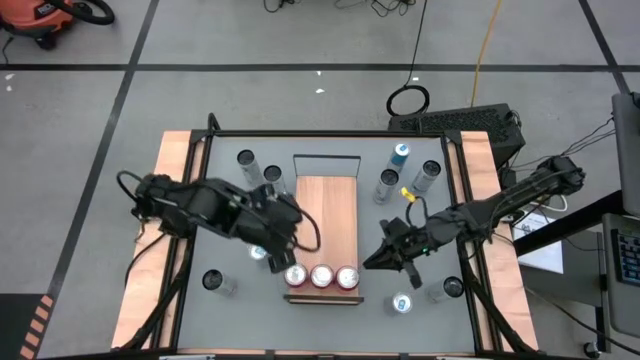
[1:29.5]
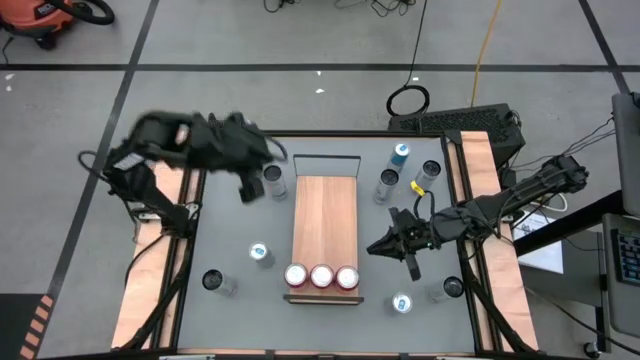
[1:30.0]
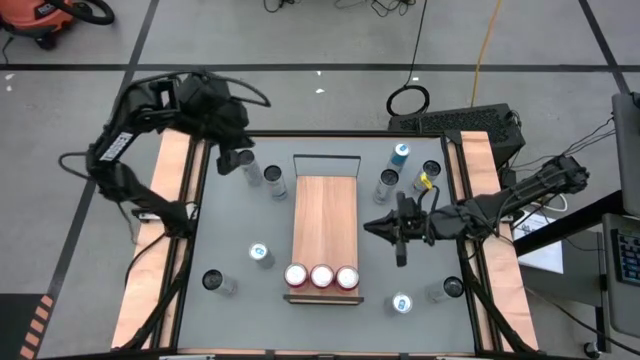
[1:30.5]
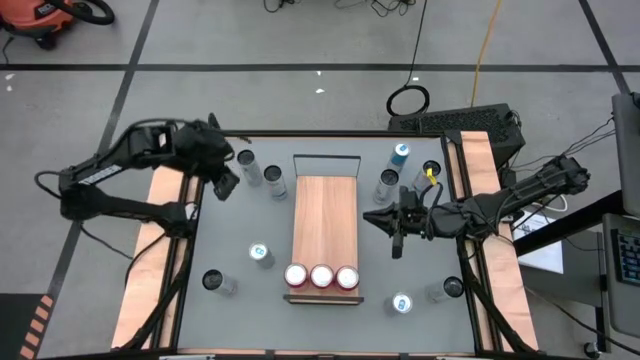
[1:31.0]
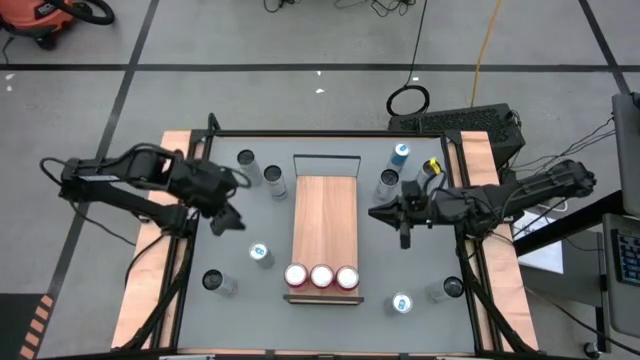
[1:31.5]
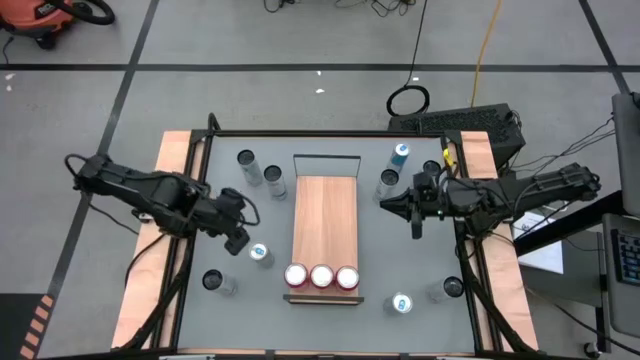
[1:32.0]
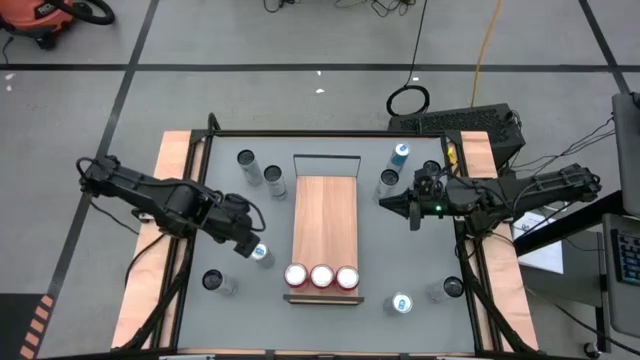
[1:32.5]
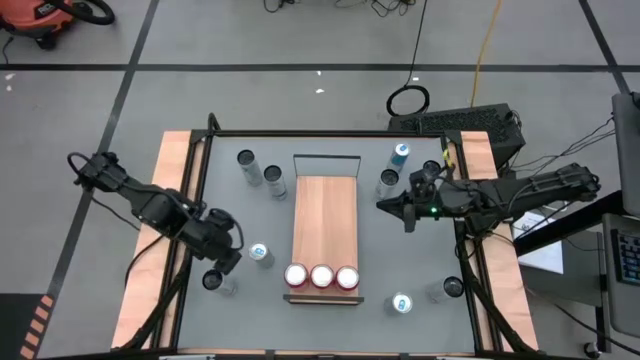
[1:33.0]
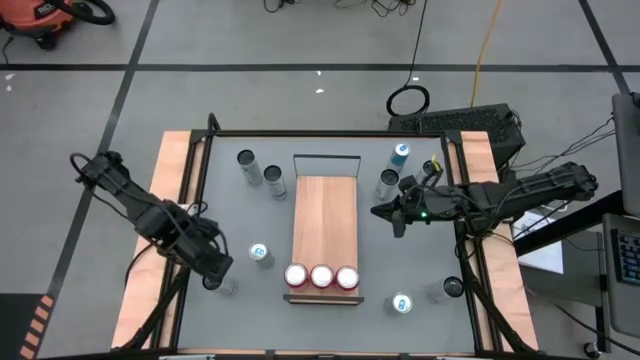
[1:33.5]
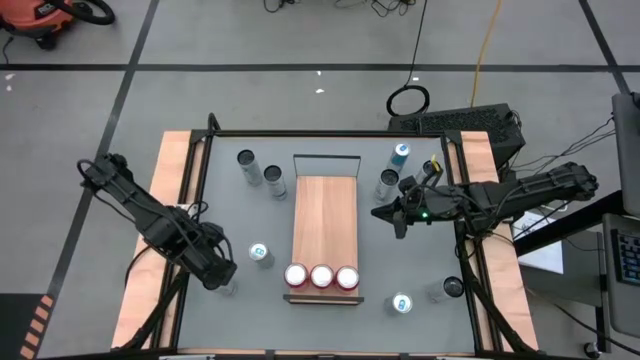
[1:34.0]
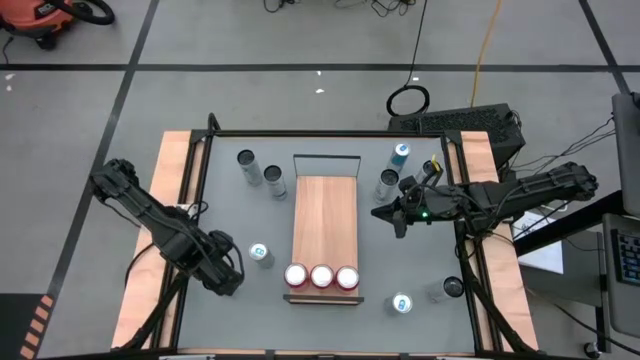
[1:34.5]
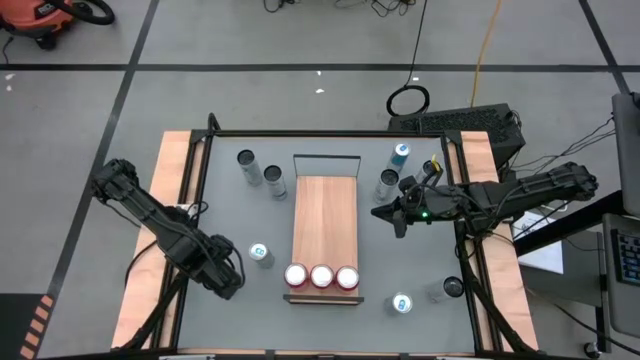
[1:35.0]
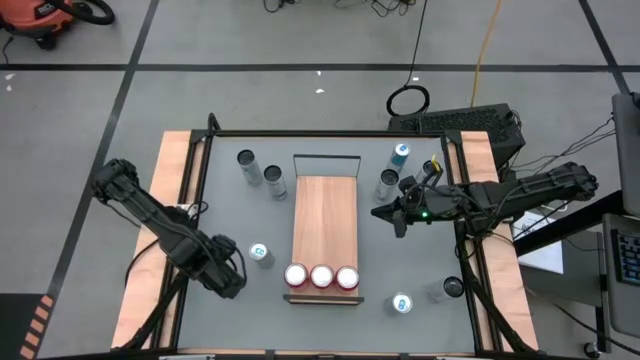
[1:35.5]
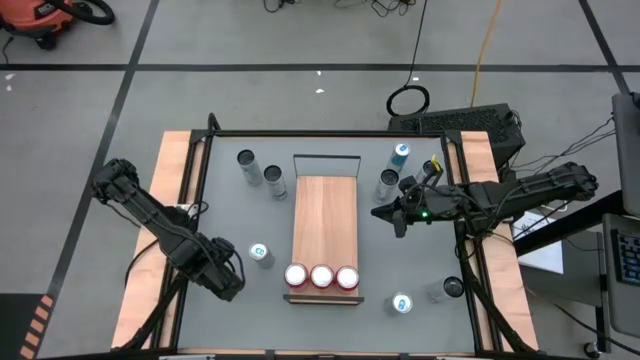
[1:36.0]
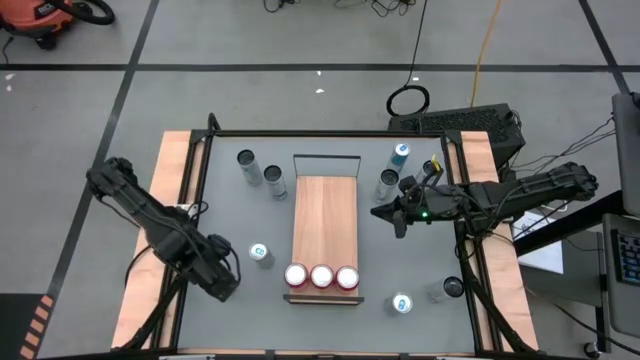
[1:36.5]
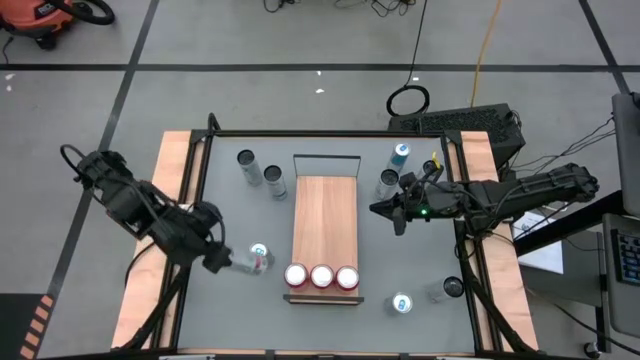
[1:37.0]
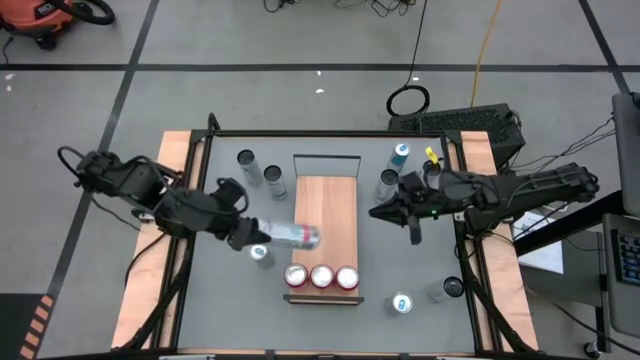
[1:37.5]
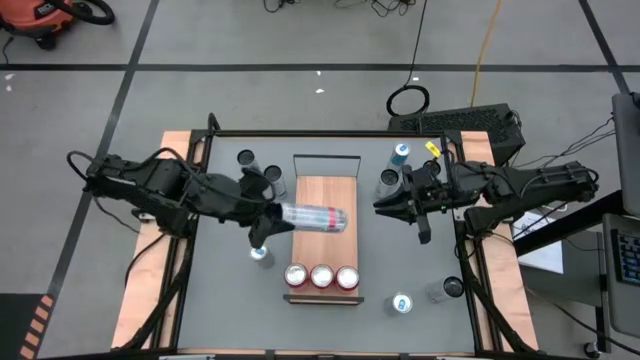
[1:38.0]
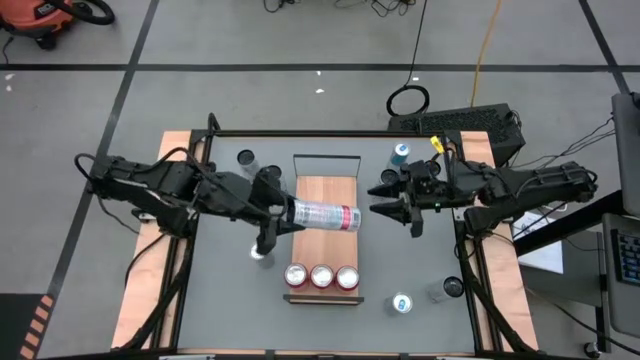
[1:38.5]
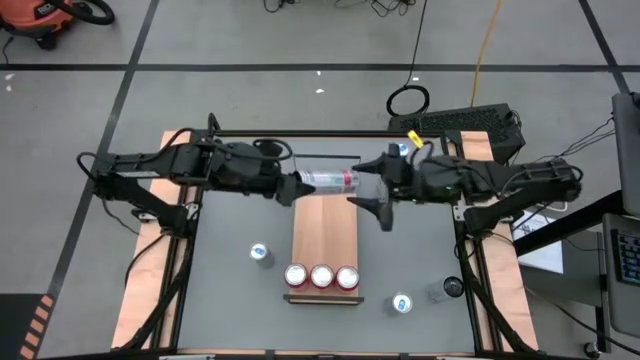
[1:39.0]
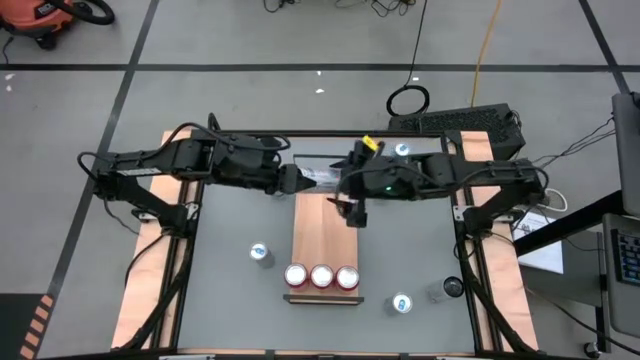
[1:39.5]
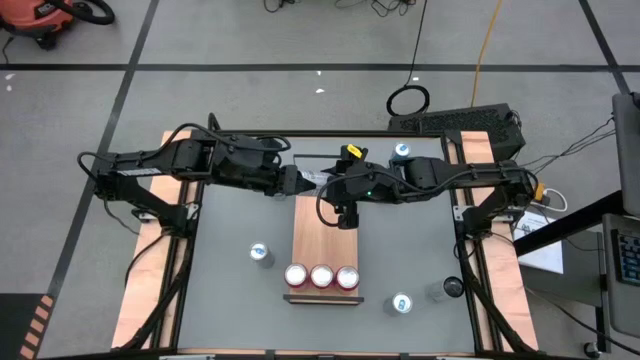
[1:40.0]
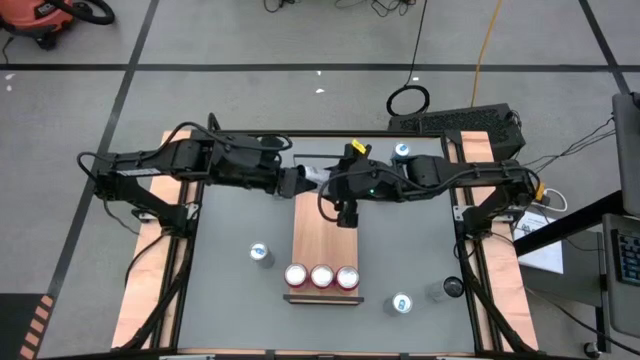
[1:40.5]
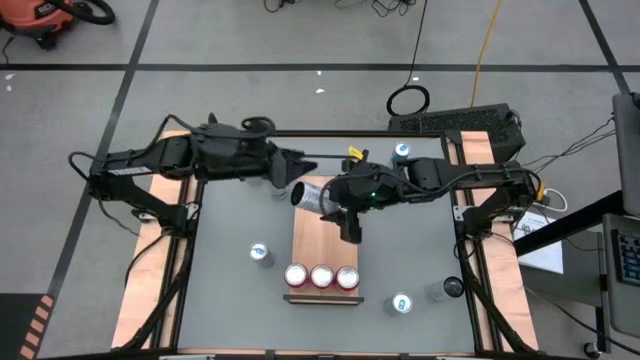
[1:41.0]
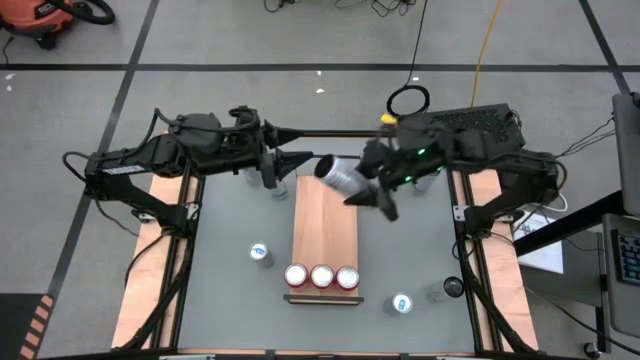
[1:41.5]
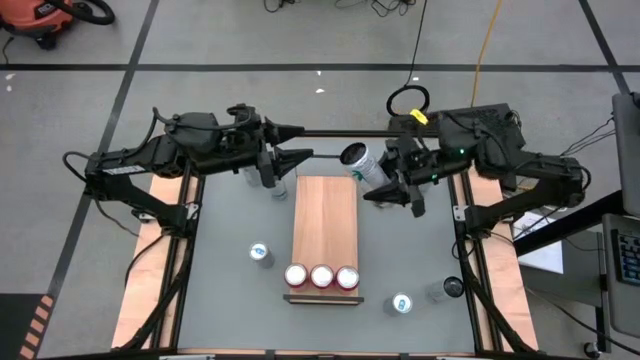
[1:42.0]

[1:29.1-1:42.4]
Task: Sort soda cans
Put the bottom left white pink soda can on the shelf
